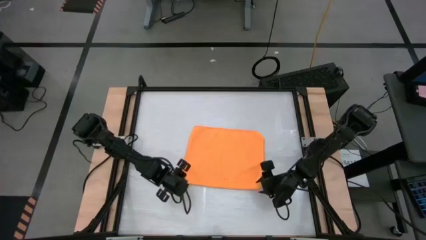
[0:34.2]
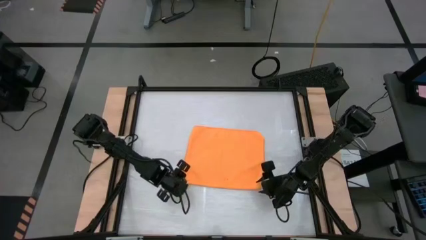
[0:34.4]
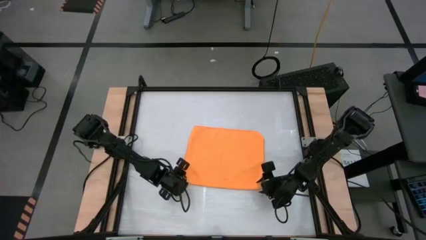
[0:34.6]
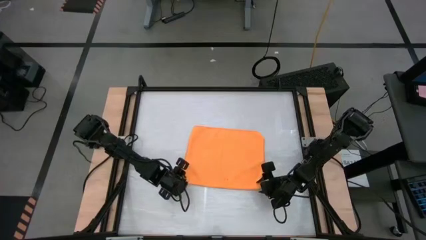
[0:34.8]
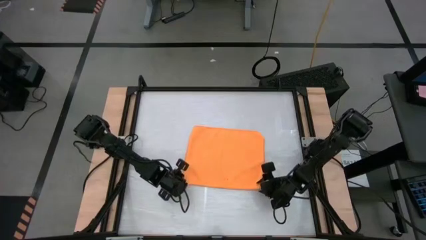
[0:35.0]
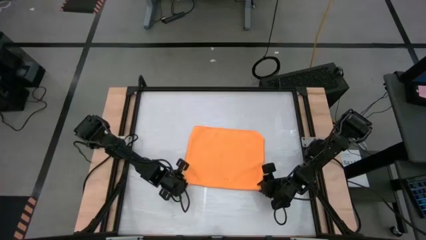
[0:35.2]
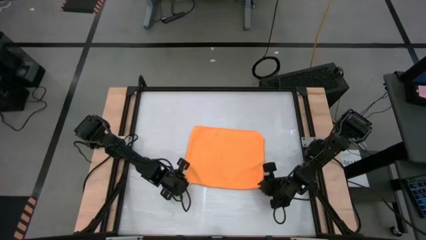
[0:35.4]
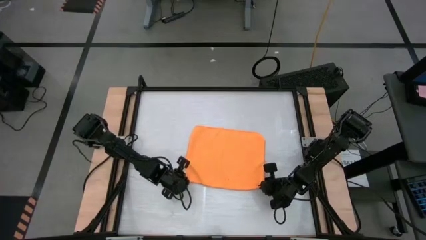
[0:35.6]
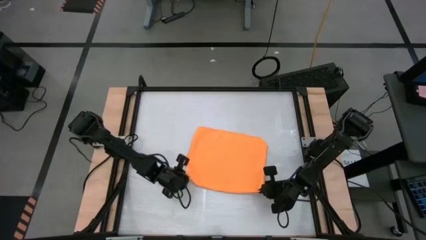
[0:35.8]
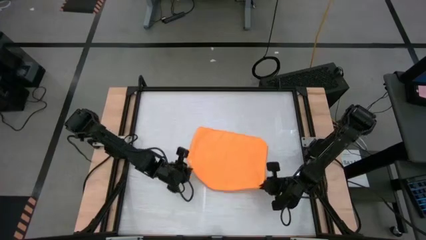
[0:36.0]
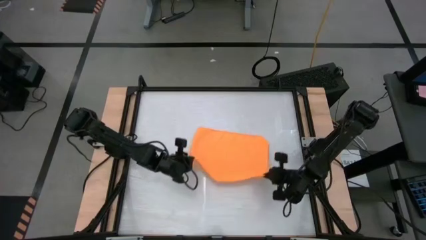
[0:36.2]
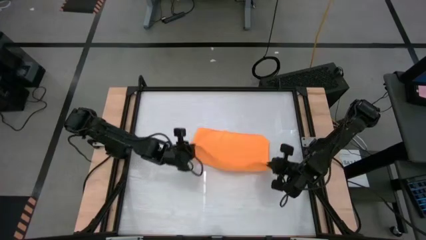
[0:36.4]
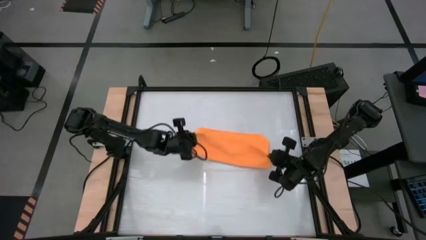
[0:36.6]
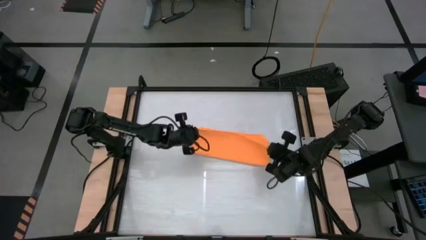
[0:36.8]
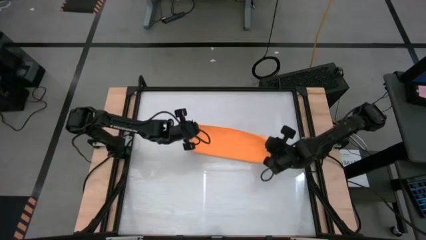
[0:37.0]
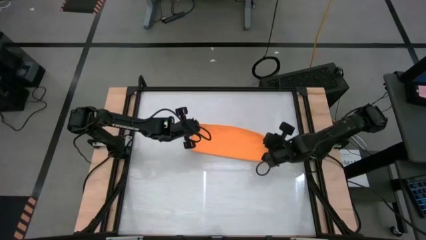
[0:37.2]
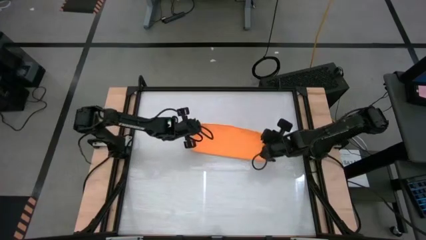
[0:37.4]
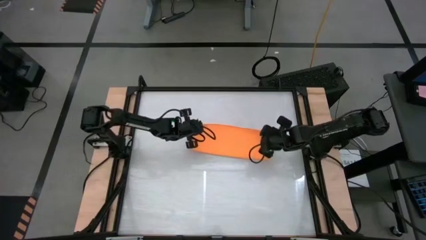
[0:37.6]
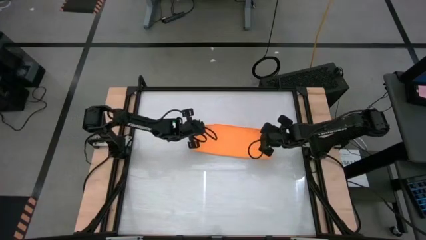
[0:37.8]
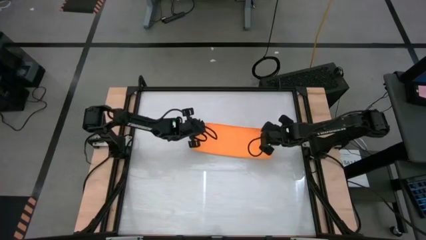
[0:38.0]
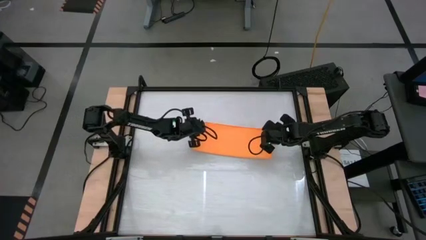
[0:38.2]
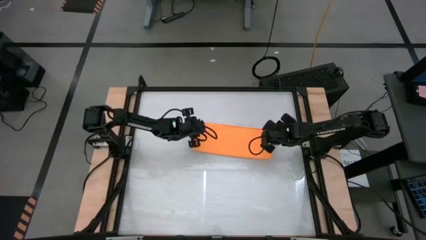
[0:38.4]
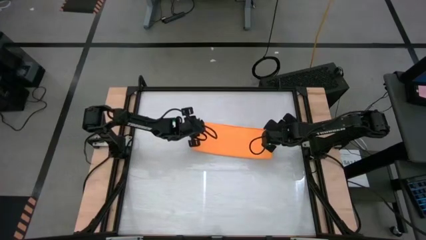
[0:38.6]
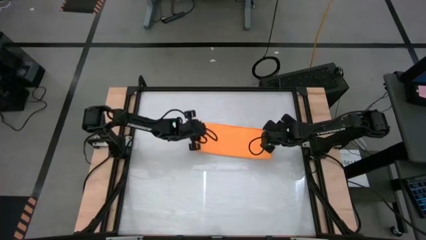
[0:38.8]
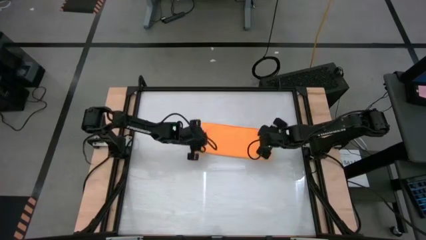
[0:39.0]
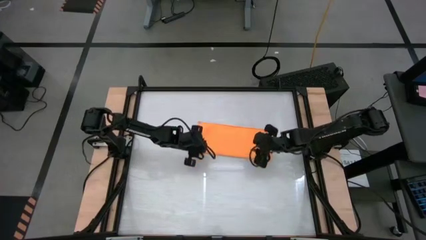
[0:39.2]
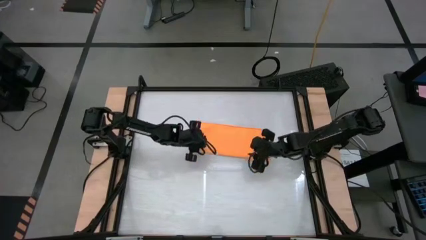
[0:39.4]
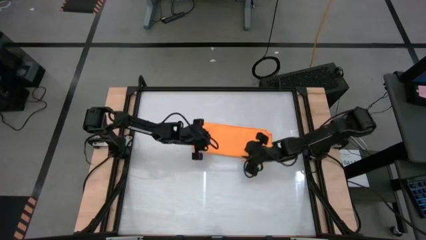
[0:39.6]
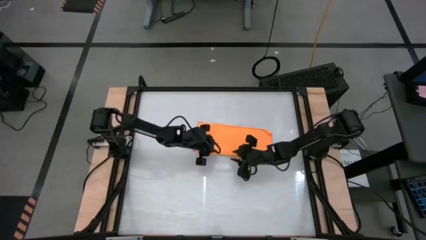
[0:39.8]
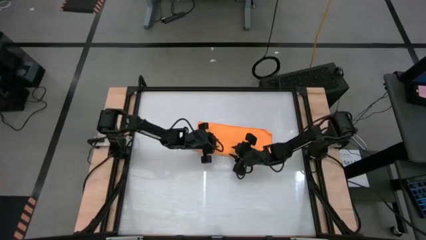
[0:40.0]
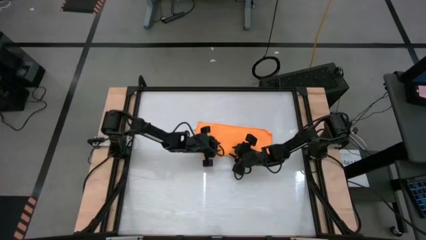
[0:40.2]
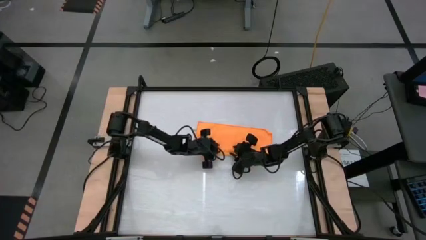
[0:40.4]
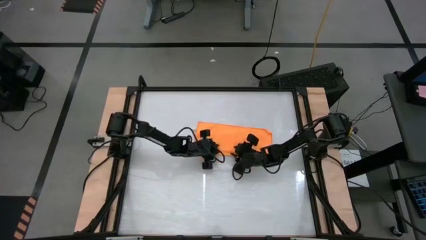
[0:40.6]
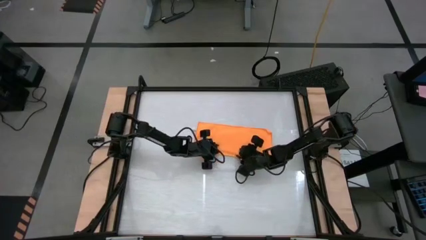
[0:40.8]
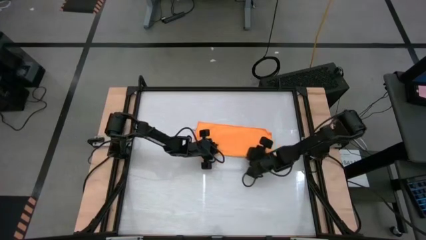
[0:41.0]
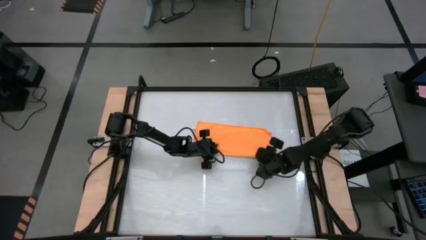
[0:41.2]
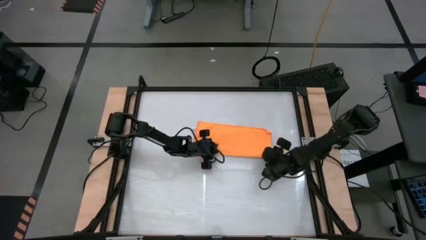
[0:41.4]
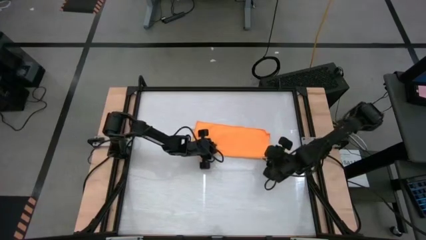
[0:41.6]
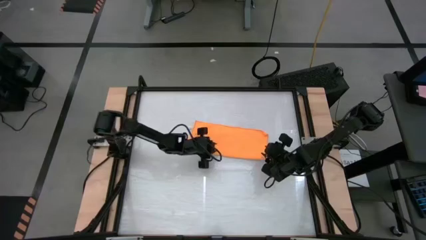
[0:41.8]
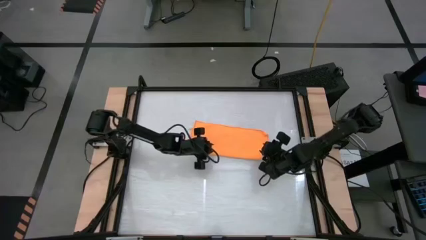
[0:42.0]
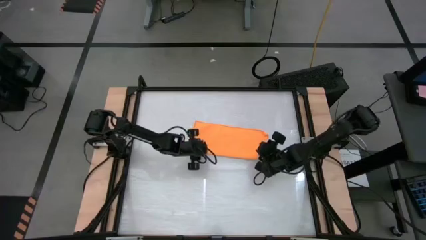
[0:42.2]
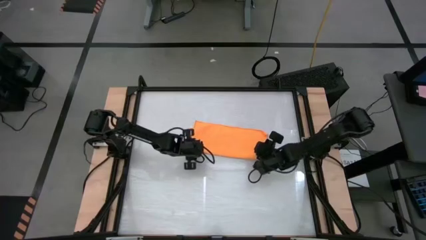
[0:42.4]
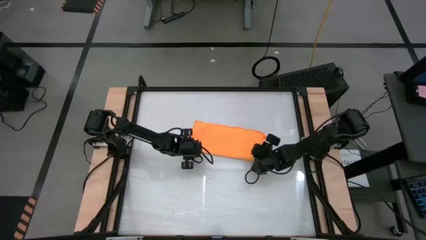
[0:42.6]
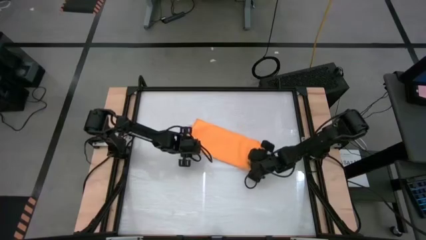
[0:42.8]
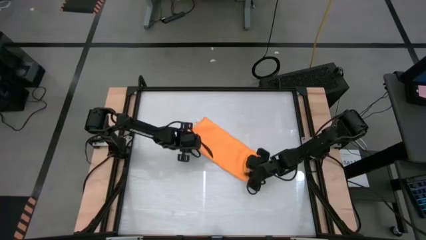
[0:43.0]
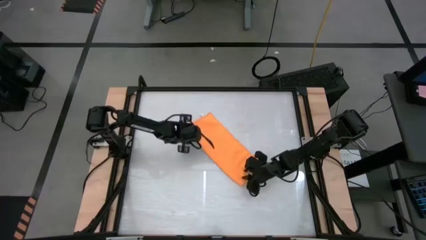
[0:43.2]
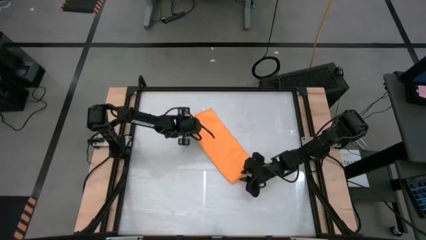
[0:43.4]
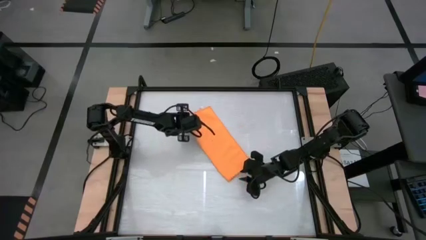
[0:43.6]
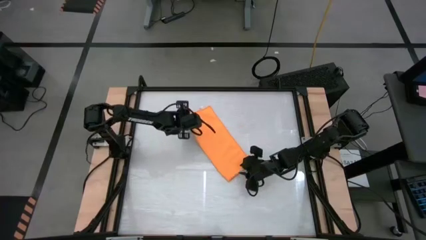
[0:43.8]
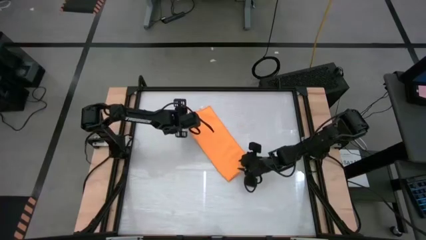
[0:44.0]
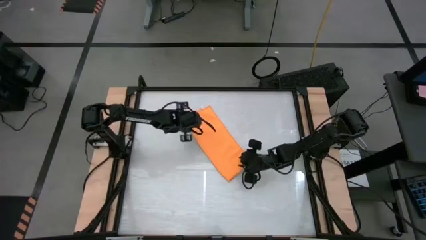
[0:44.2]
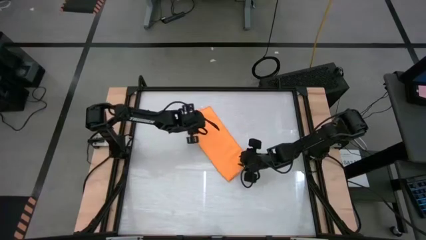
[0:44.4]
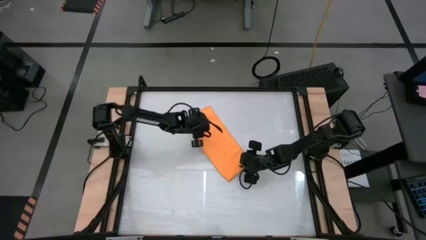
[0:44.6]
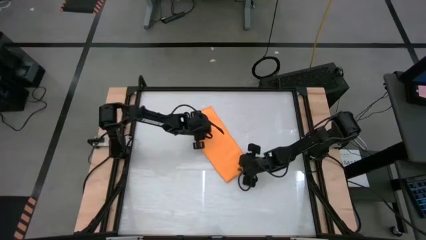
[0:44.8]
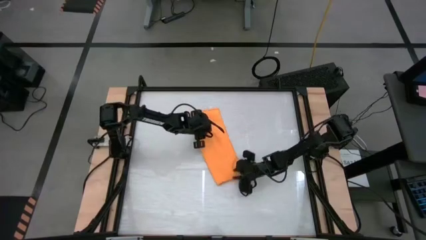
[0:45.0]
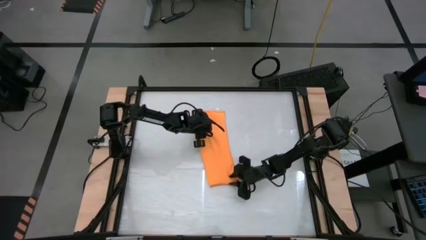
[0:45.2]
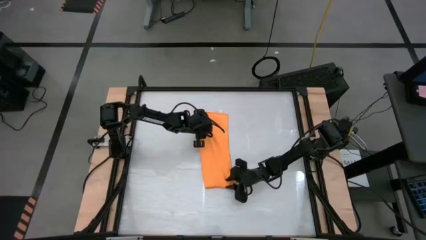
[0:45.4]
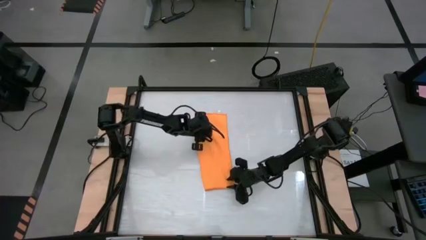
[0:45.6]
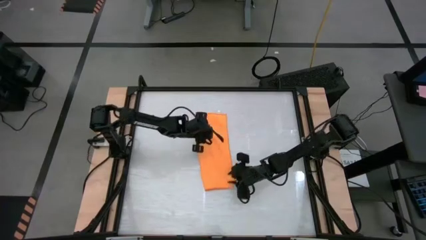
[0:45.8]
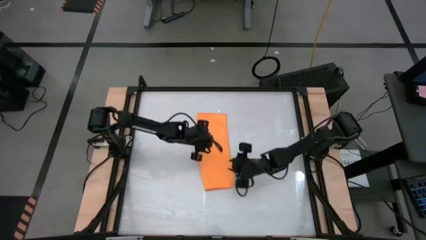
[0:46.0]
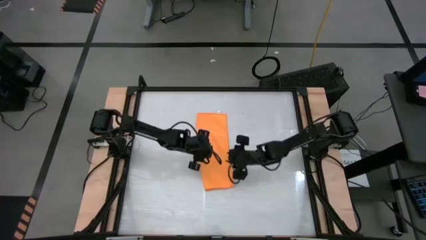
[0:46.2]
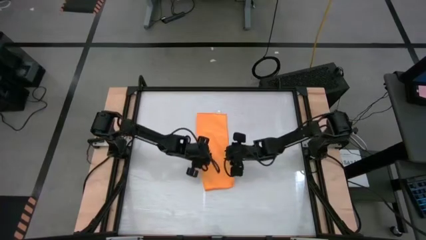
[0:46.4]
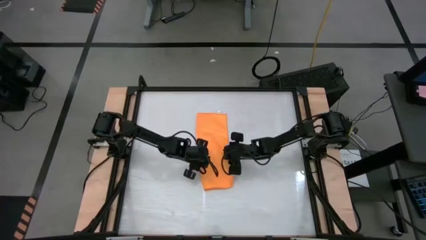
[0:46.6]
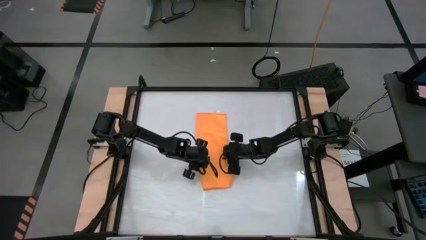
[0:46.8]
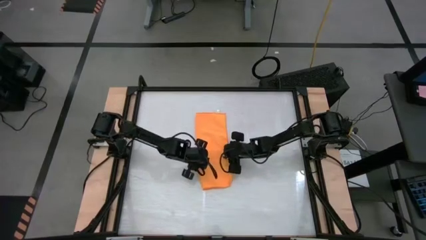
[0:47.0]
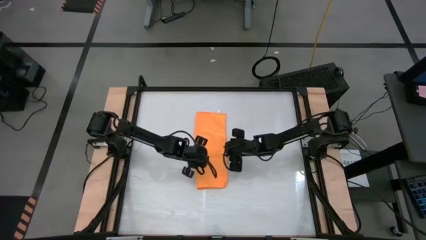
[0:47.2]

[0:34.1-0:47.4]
Task: Roll towel
Fold the orange towel
